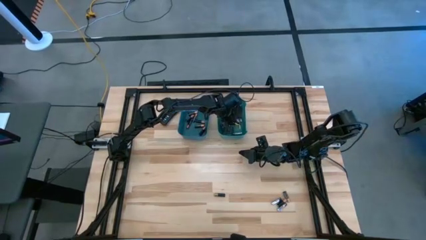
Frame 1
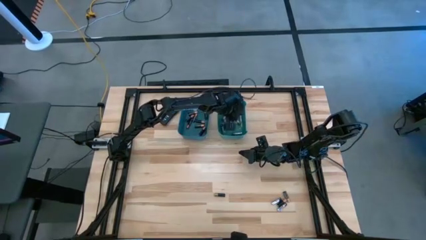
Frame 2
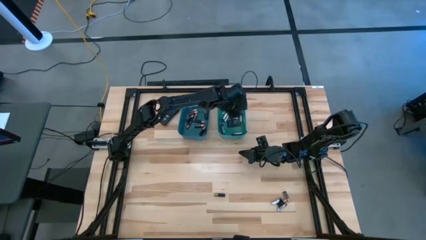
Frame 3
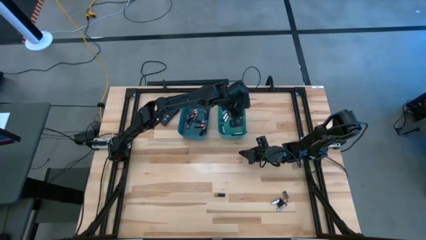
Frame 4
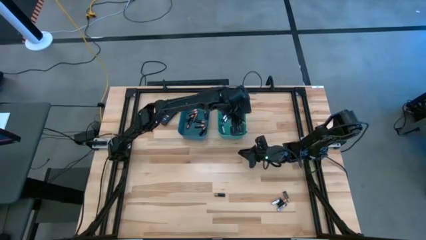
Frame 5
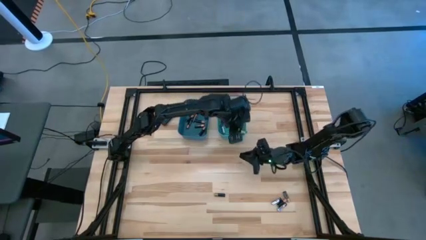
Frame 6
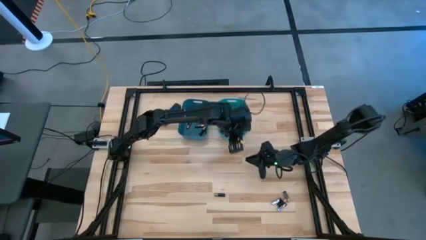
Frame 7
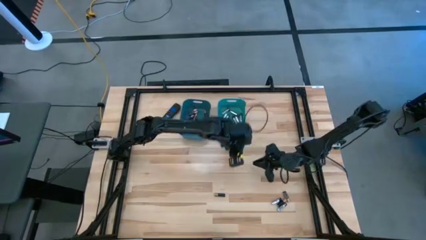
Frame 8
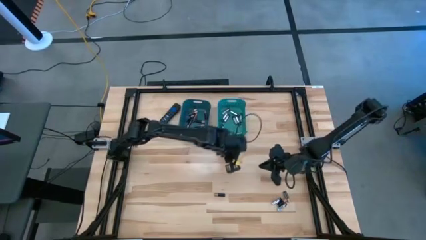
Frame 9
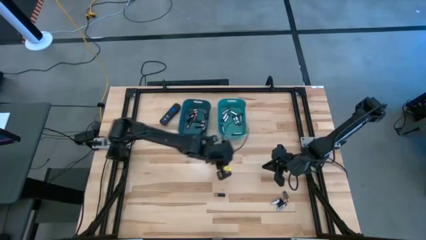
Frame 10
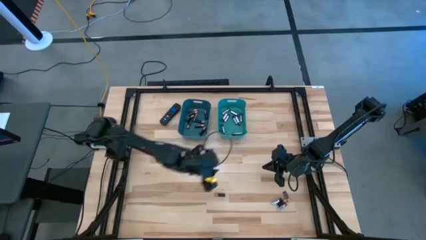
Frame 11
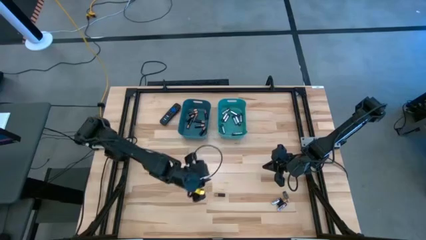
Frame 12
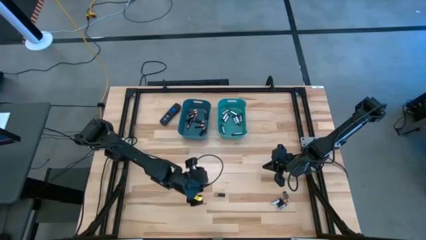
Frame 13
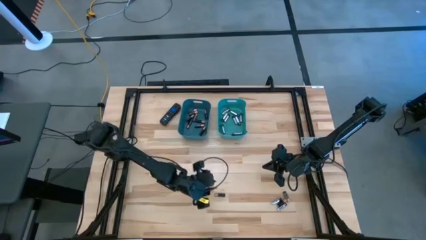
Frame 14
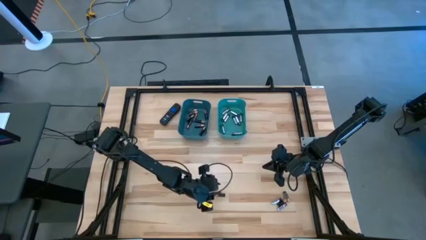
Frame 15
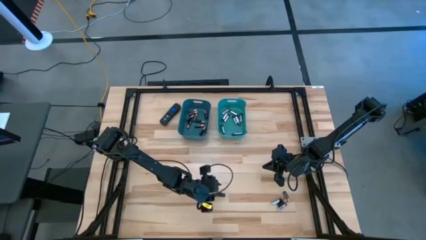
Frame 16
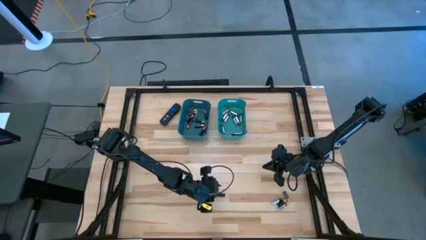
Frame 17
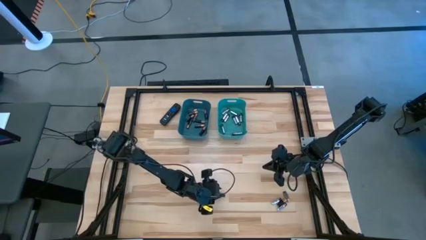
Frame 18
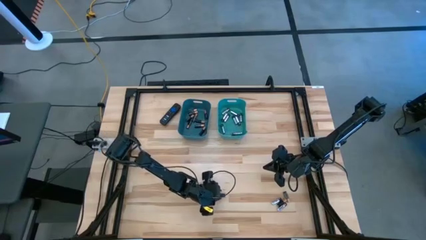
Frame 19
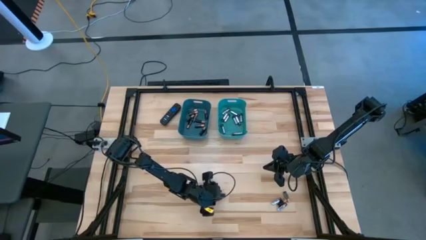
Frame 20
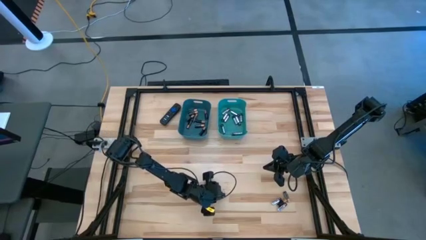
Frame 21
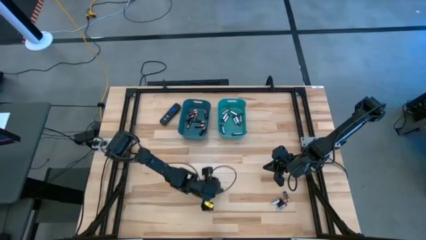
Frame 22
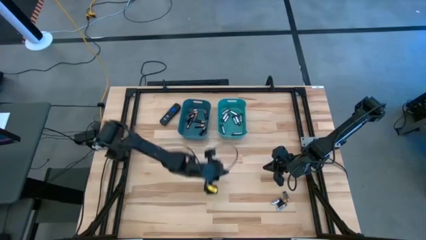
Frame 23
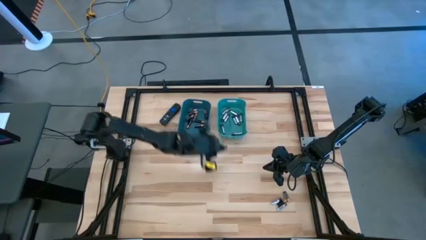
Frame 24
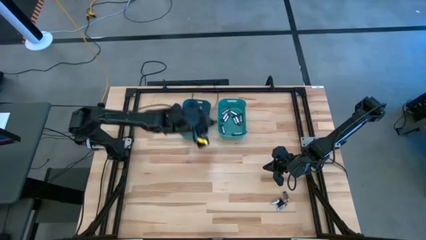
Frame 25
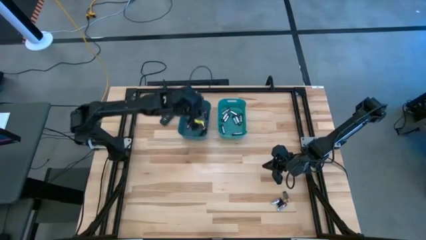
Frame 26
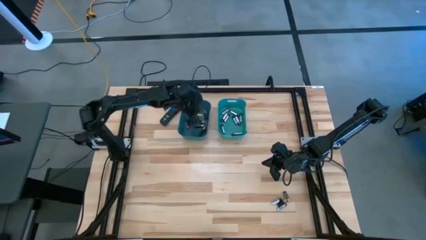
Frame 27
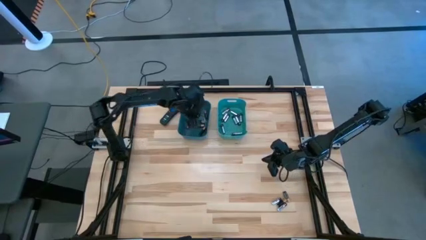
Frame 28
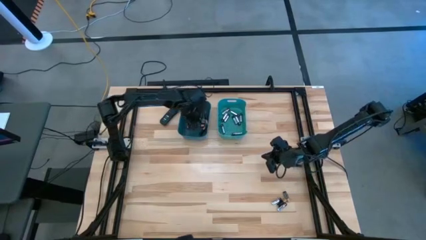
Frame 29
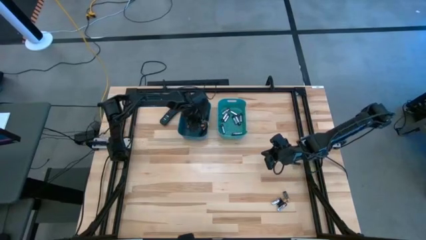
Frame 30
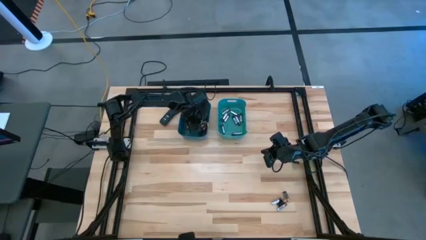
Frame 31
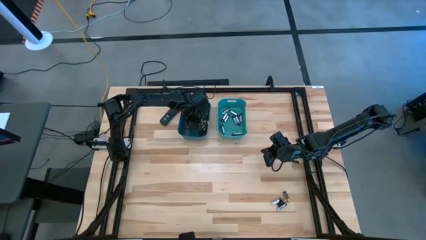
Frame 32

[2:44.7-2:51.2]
Task: Sort batteries
Put the black battery into the blue bin

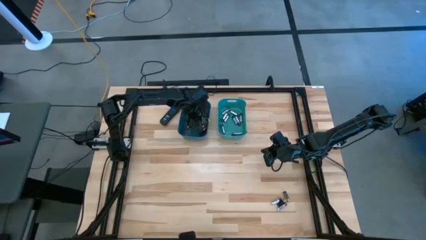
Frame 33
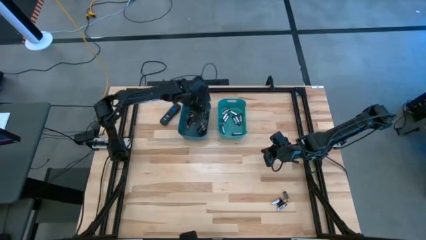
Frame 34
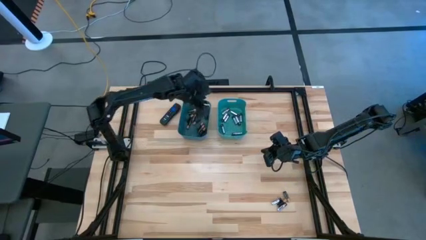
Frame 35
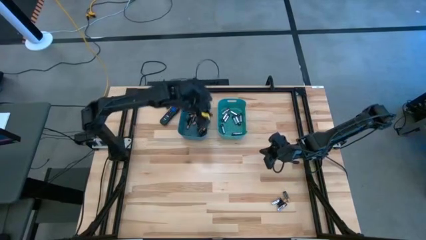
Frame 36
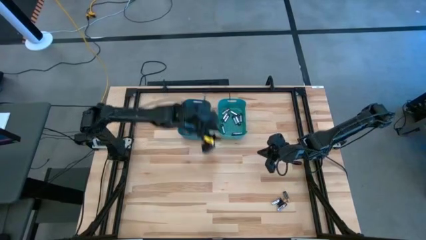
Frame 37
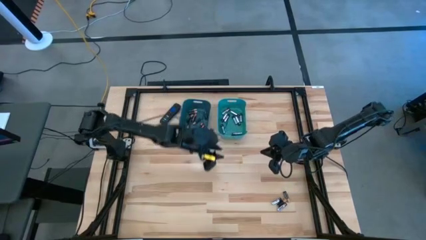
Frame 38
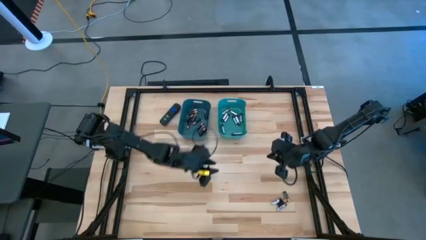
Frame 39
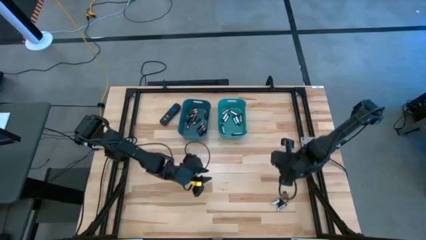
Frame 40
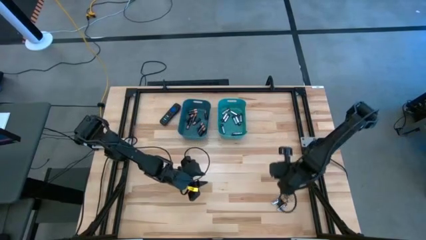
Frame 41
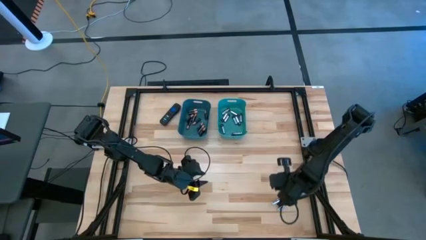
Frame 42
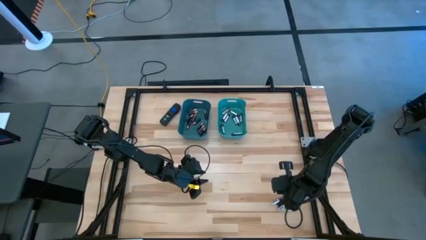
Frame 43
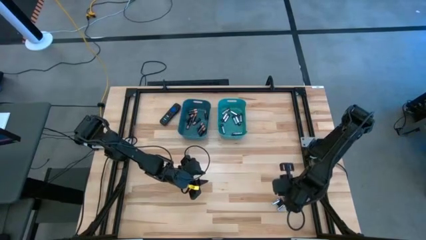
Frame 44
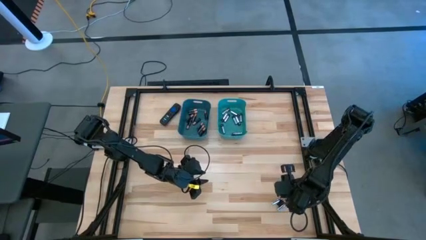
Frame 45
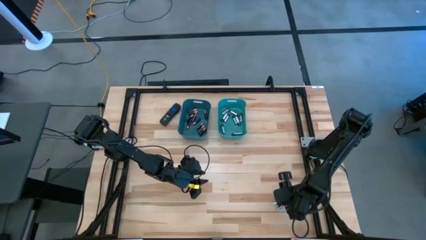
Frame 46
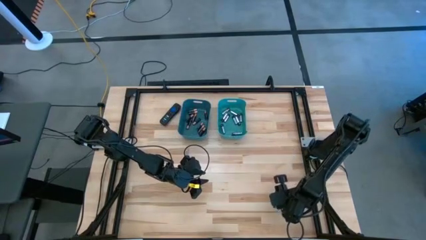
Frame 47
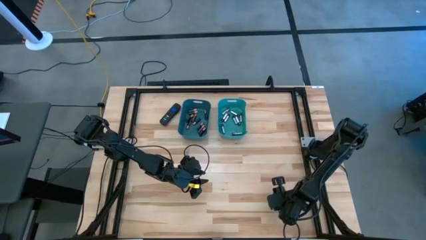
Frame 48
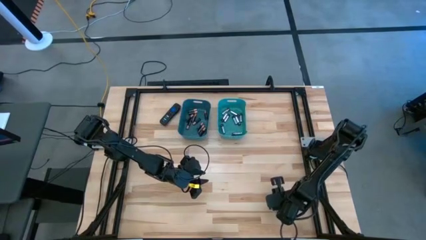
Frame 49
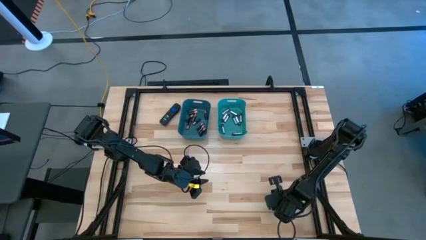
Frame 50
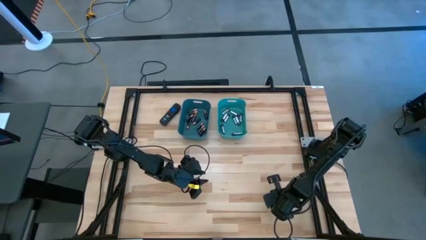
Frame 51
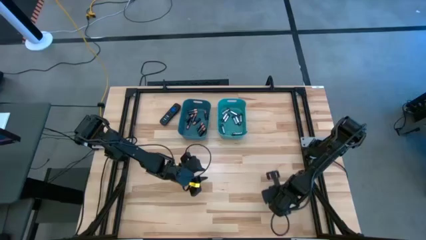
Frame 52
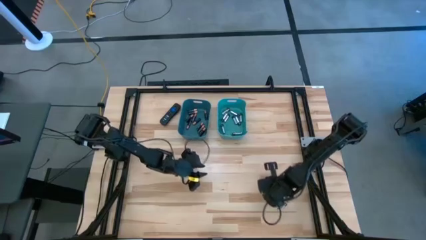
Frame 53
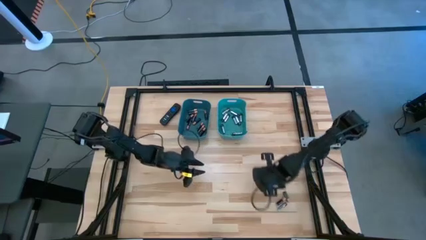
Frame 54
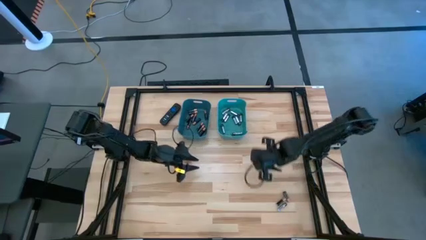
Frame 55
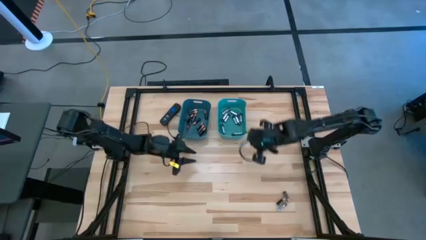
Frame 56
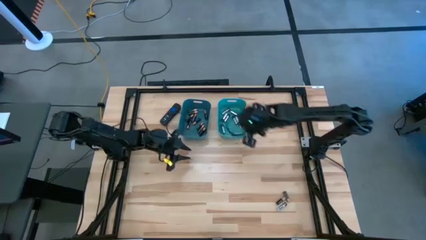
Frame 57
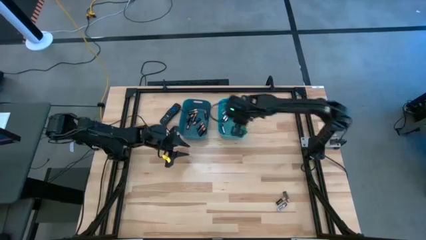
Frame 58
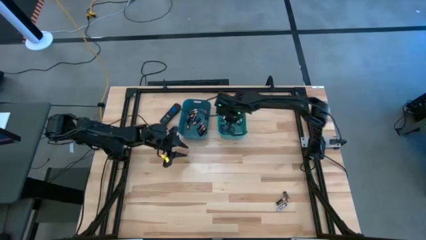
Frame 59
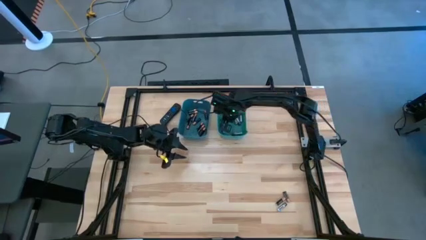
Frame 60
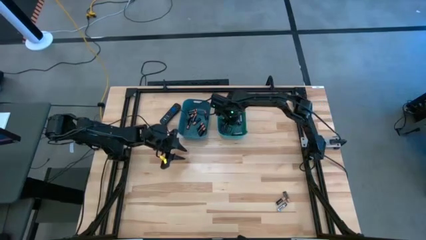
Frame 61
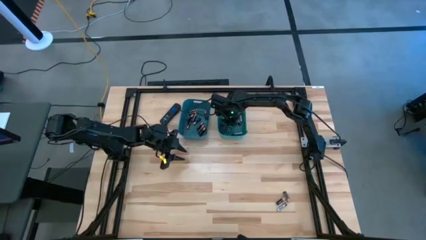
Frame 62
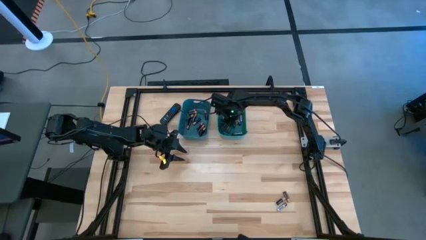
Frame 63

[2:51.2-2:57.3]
Put the silver battery into the green bin

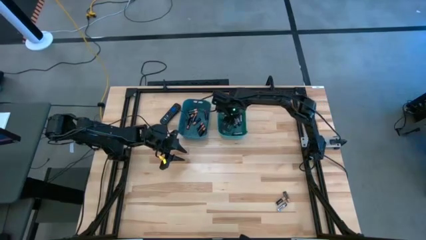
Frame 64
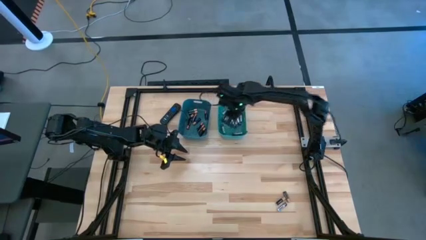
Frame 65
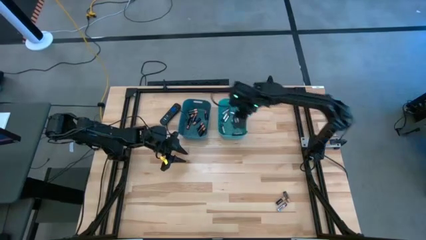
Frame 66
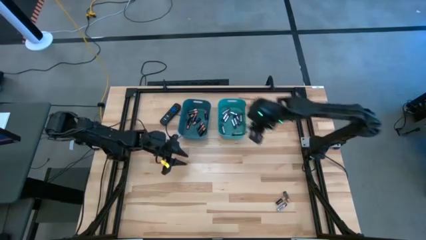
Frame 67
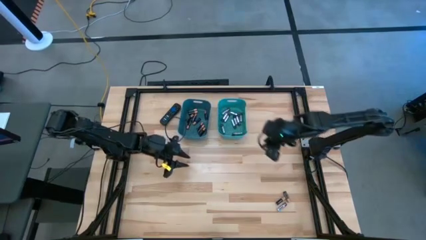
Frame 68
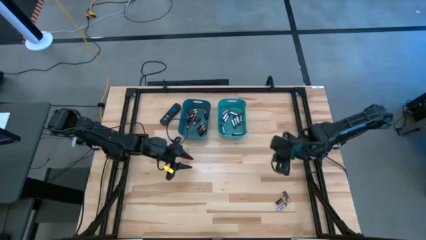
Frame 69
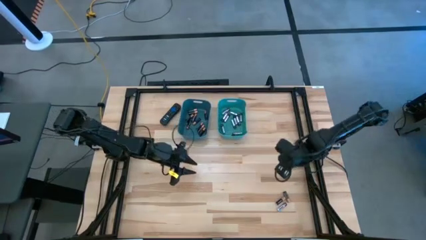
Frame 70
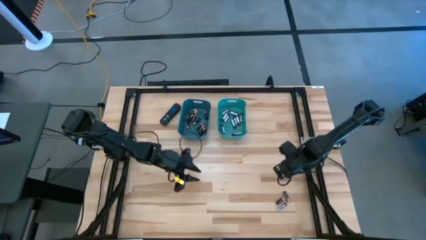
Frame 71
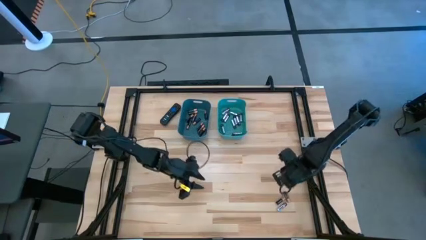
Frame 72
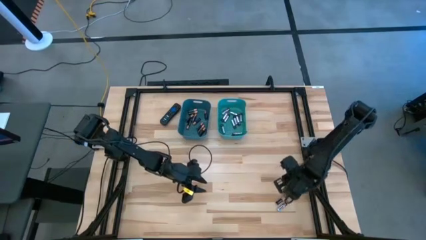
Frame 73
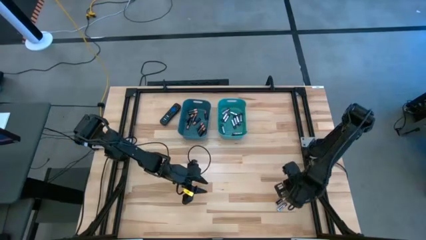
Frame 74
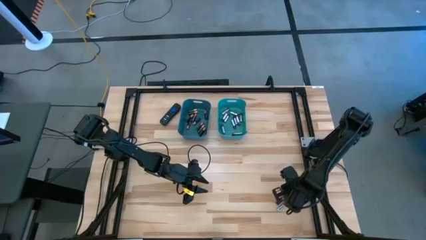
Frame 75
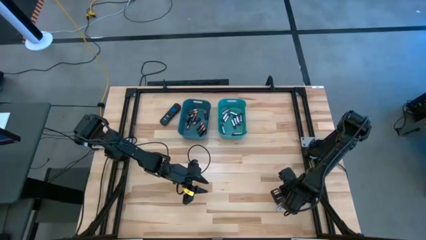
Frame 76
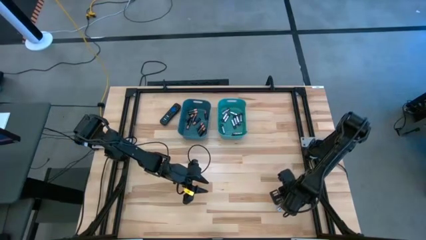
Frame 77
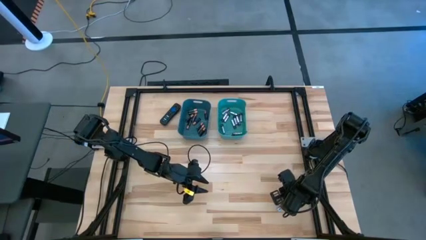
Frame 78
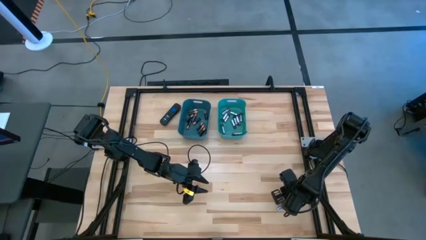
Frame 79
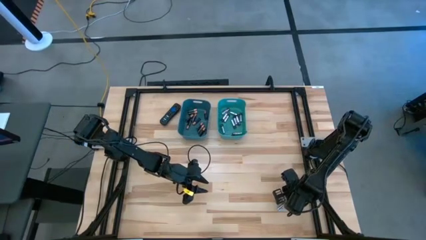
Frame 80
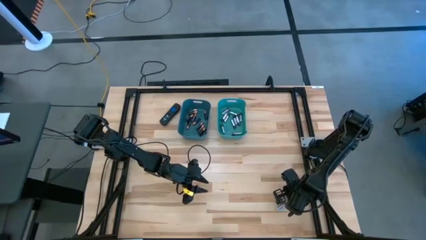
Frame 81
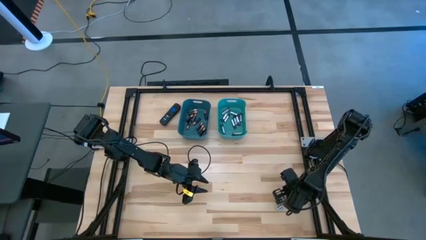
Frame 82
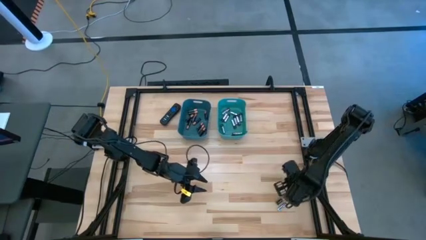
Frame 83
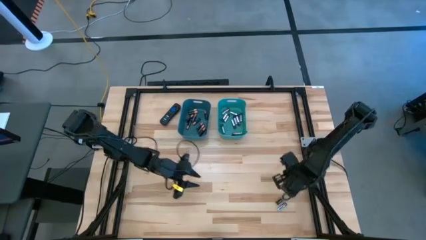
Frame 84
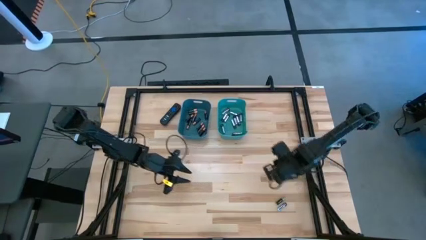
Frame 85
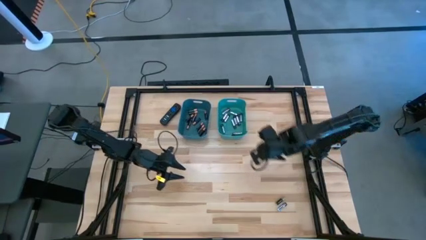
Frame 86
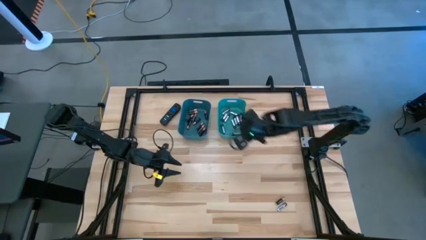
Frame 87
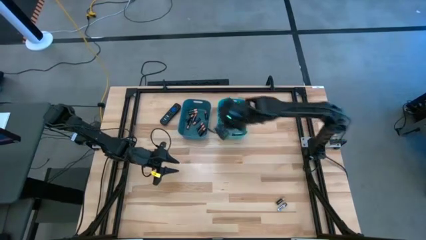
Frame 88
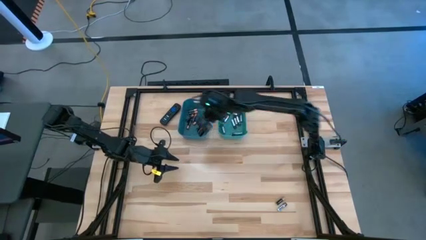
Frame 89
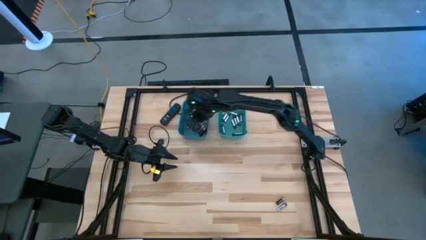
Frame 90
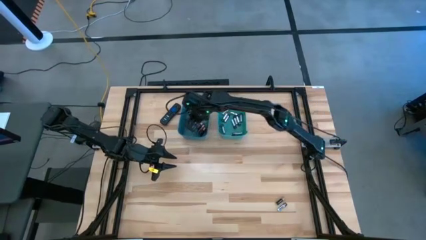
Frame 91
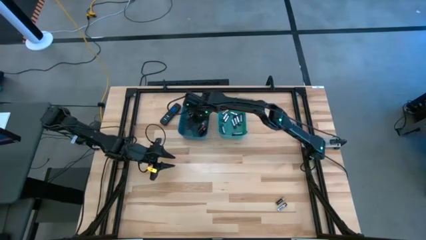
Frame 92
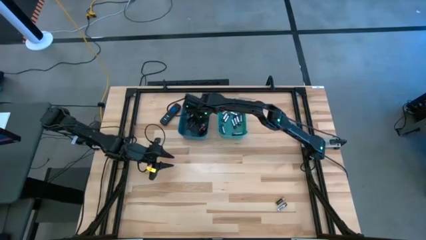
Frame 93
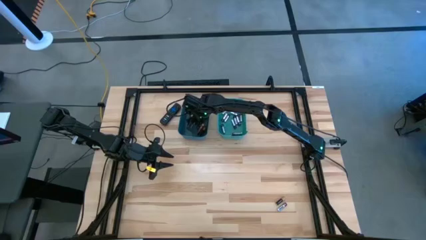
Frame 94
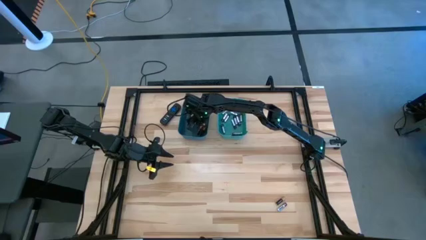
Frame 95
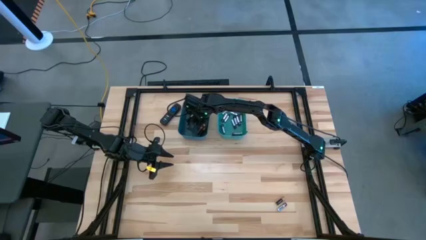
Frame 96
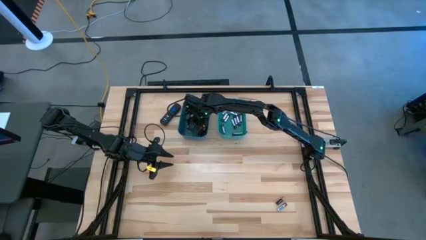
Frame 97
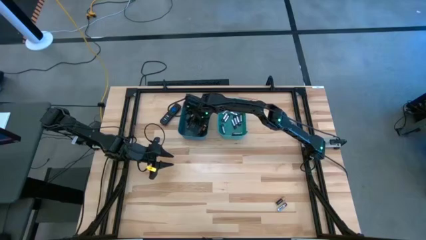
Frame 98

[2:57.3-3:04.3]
Put the black battery into the blue bin
